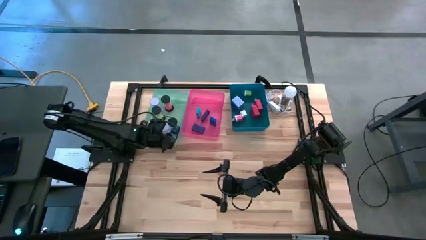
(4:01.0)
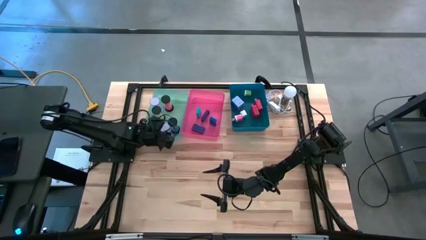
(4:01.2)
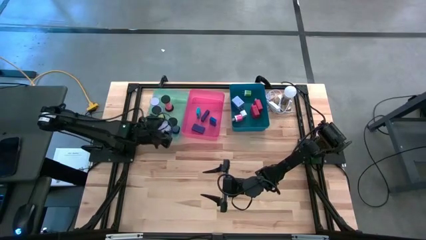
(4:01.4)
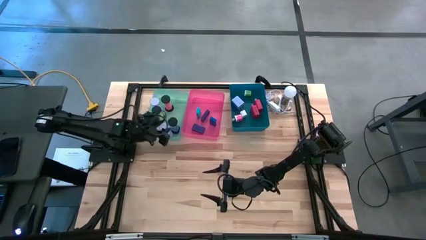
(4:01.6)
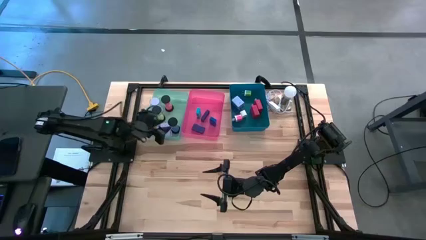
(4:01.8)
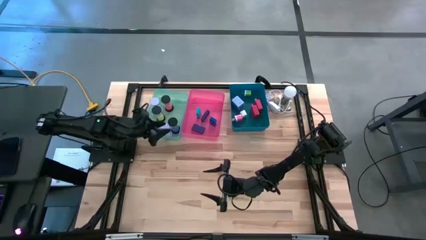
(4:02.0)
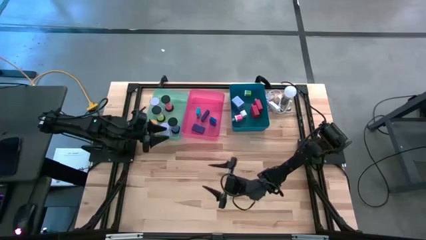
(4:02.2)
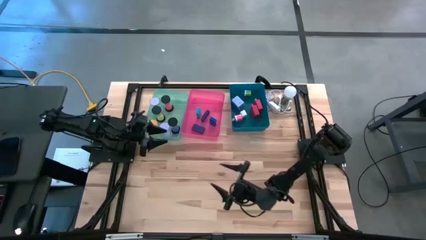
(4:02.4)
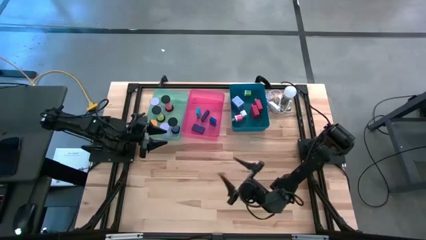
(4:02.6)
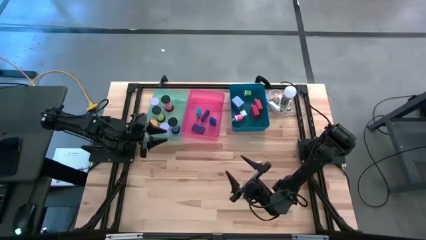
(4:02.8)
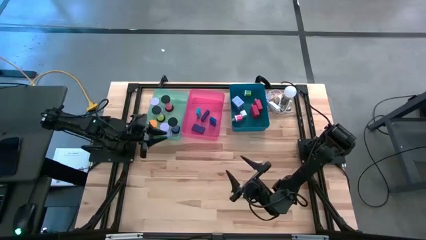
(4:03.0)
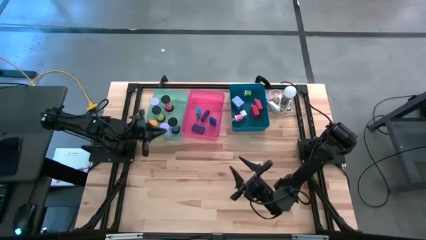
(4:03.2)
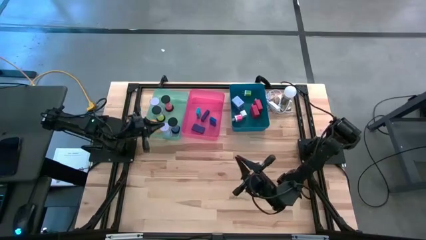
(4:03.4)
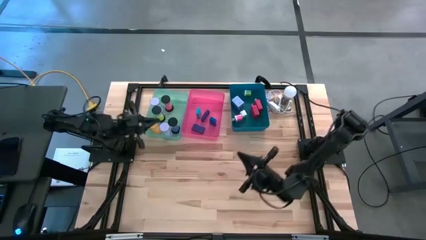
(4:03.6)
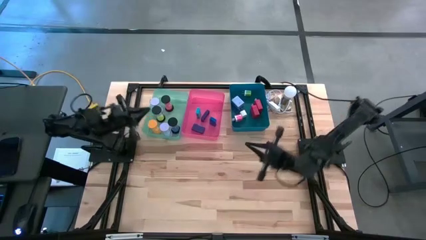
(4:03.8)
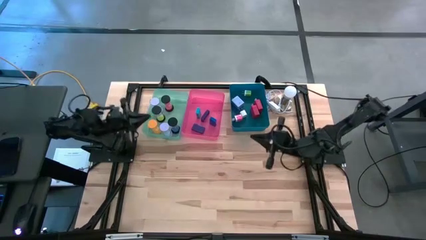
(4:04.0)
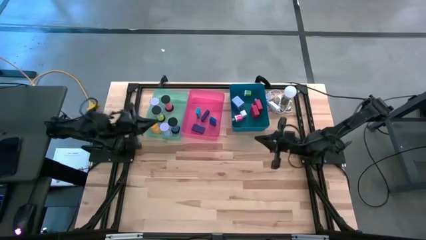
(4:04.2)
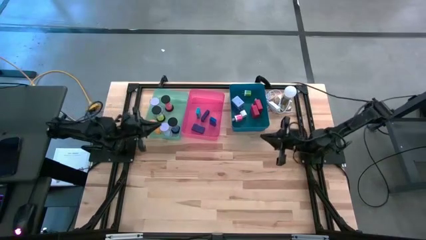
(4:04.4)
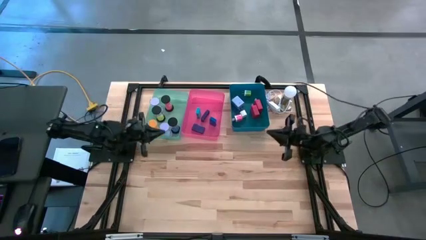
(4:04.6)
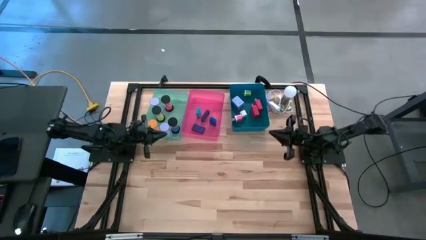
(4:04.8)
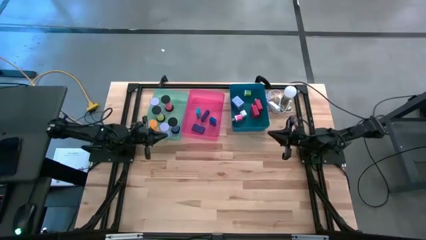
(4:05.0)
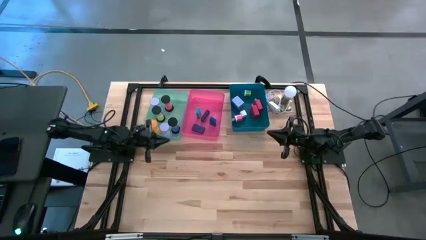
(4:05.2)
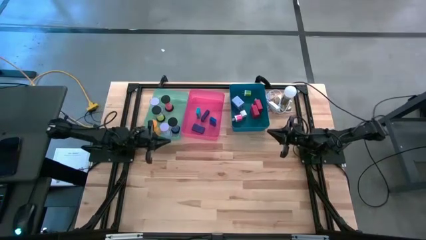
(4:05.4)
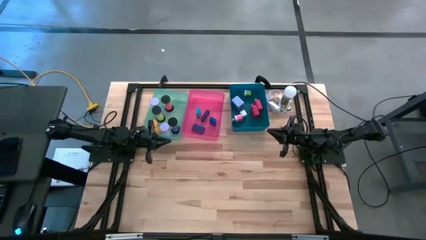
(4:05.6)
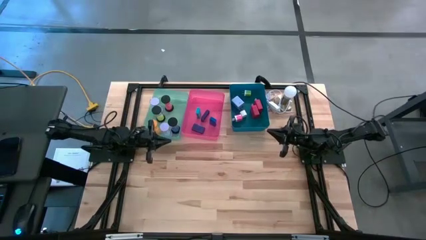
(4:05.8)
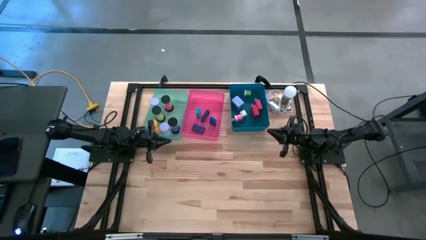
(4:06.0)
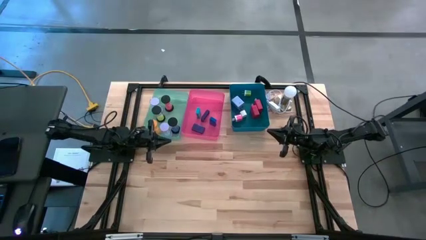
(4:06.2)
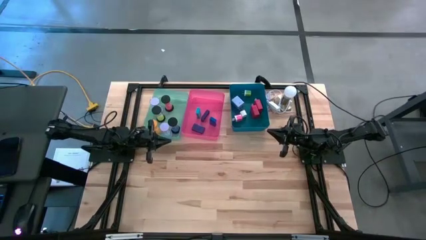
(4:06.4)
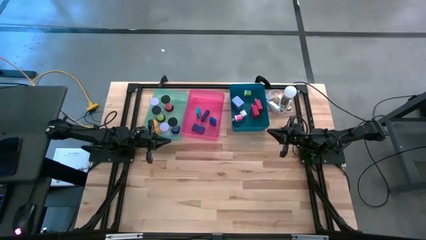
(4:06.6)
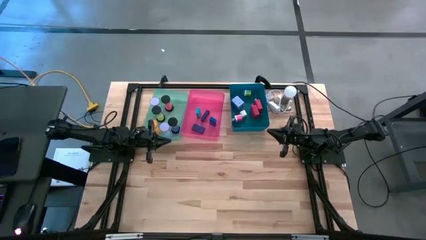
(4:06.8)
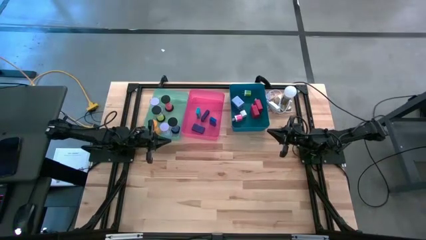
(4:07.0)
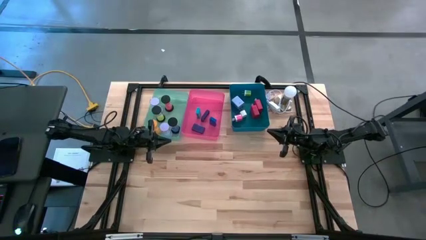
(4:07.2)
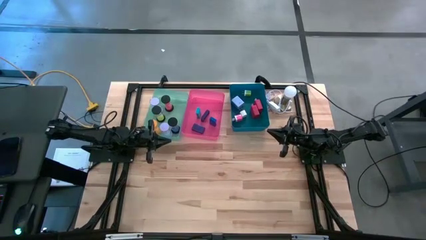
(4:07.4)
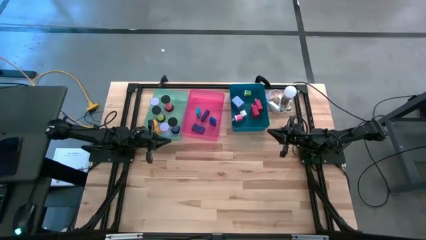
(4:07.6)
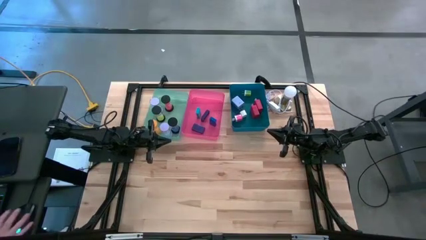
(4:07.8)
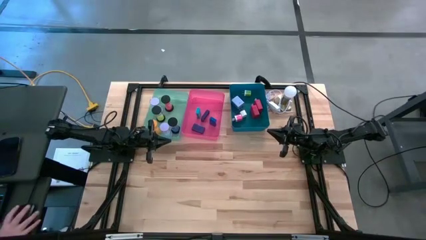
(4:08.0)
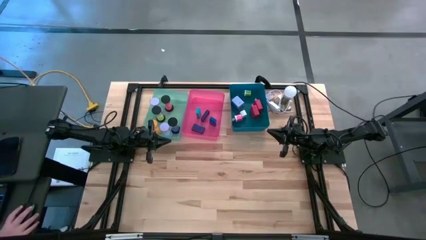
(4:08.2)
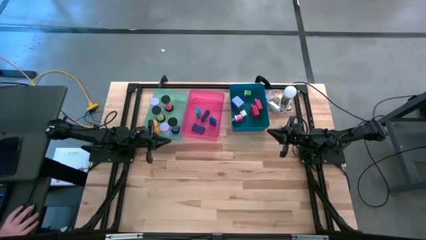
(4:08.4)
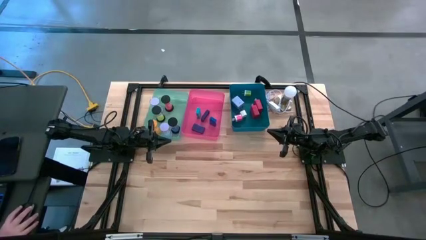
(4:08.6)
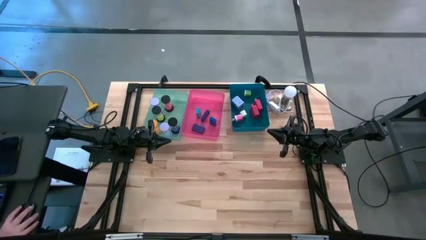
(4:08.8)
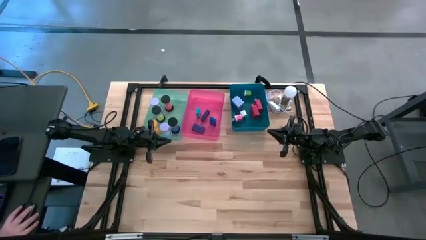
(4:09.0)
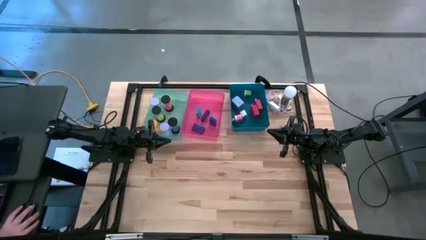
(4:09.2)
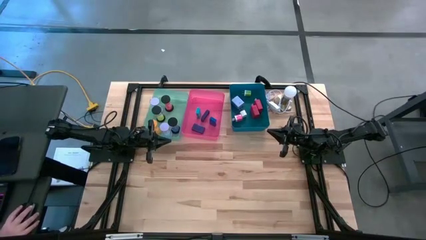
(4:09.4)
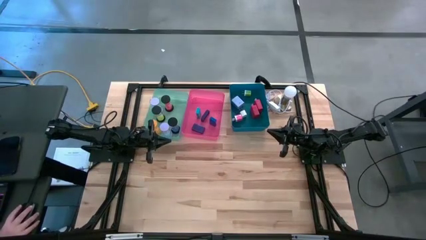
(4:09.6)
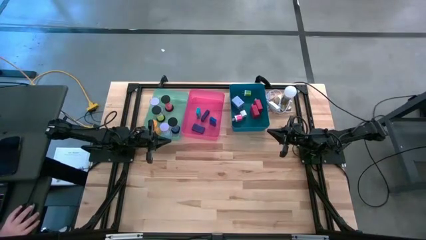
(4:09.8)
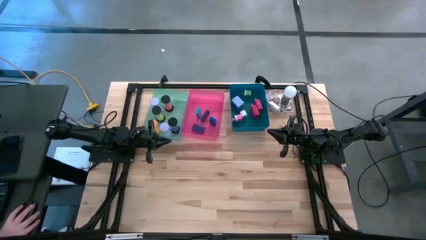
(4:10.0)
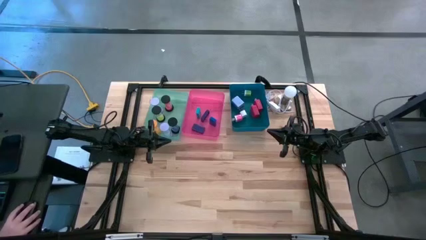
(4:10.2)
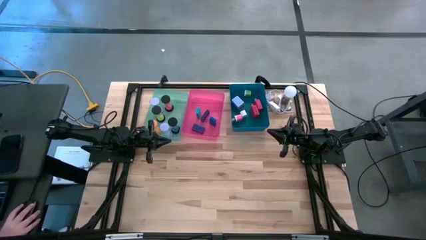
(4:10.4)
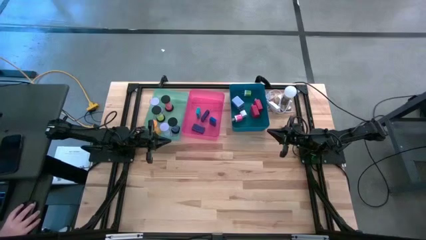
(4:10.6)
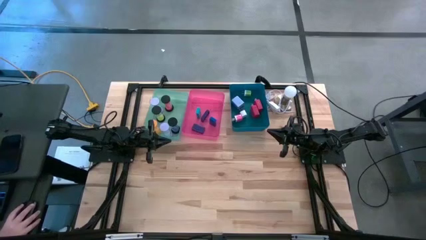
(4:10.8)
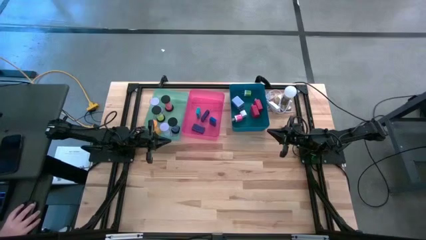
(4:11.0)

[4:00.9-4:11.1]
Task: Pick & Place Office items
Return to Home Position
